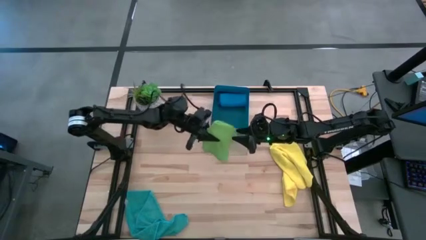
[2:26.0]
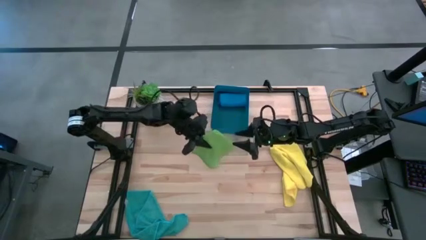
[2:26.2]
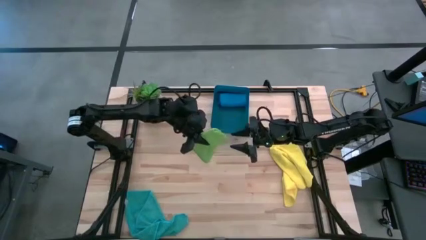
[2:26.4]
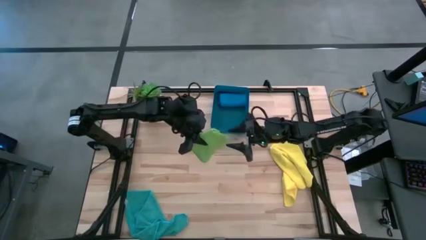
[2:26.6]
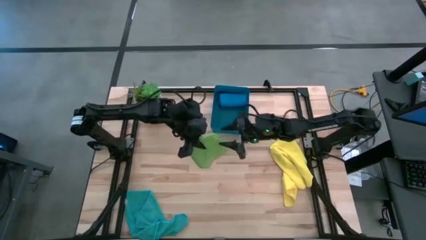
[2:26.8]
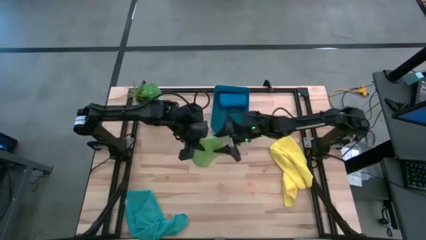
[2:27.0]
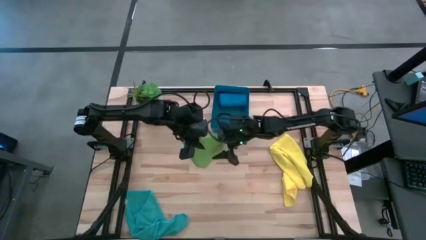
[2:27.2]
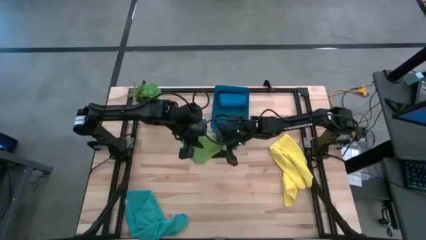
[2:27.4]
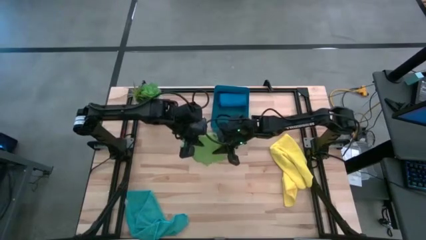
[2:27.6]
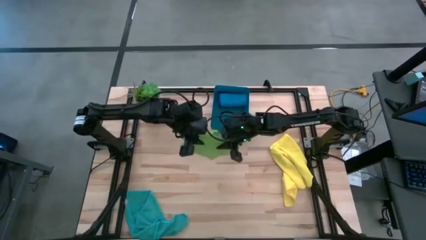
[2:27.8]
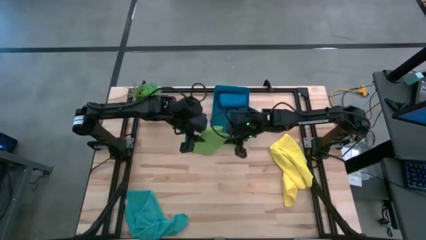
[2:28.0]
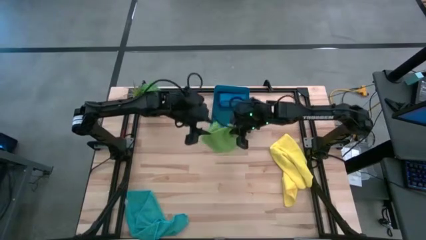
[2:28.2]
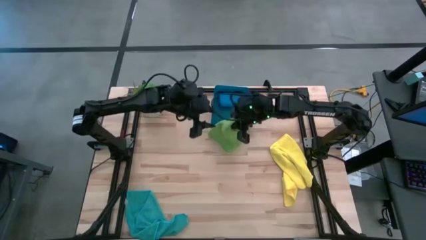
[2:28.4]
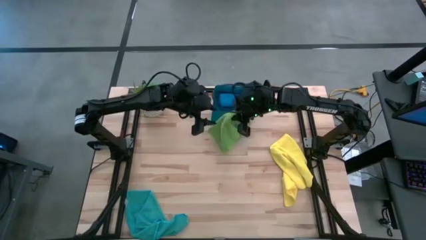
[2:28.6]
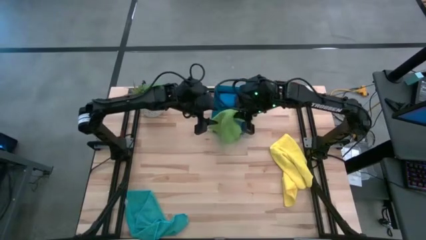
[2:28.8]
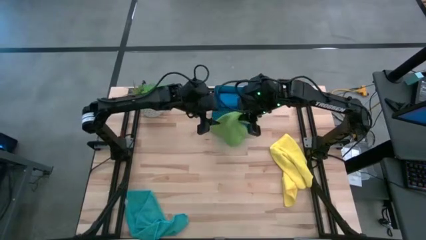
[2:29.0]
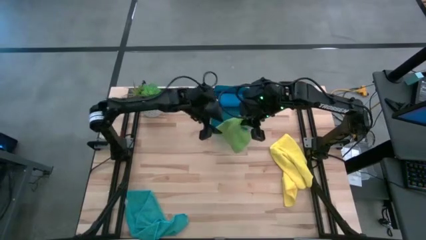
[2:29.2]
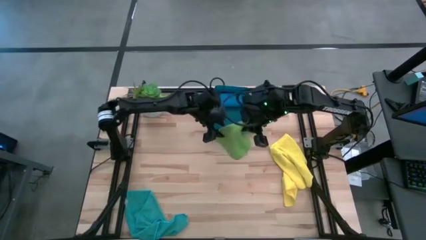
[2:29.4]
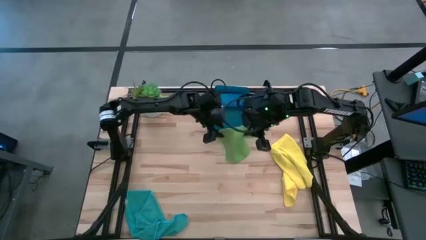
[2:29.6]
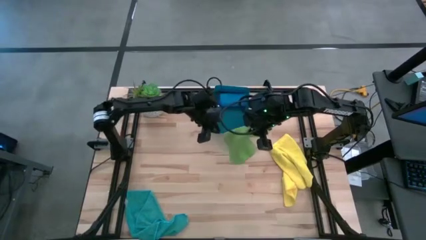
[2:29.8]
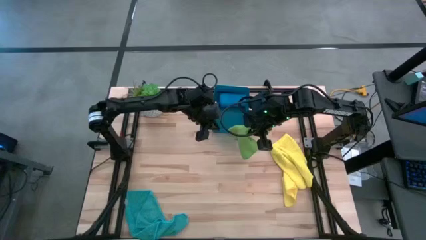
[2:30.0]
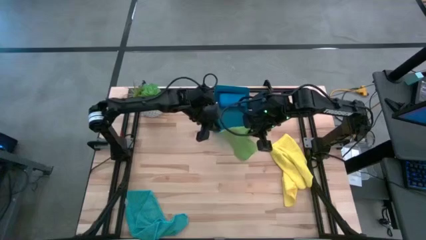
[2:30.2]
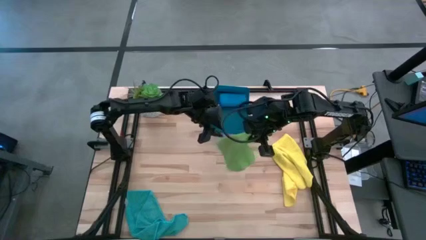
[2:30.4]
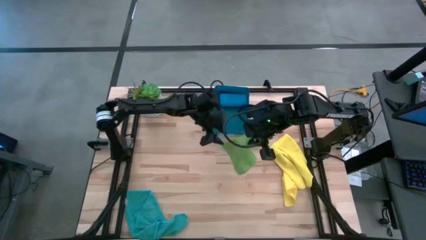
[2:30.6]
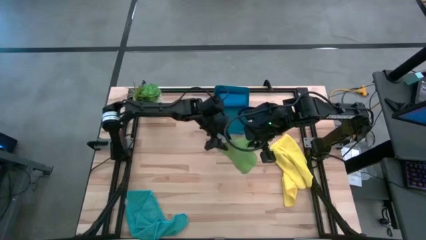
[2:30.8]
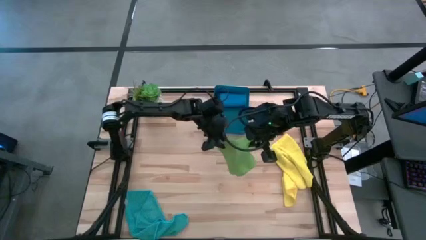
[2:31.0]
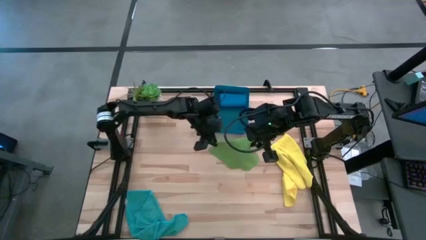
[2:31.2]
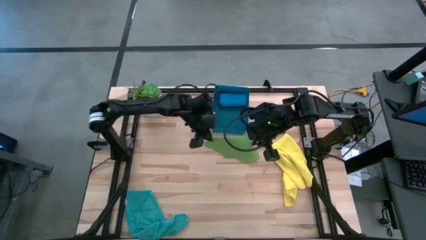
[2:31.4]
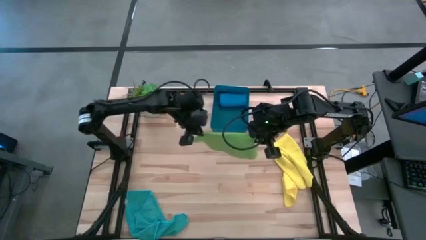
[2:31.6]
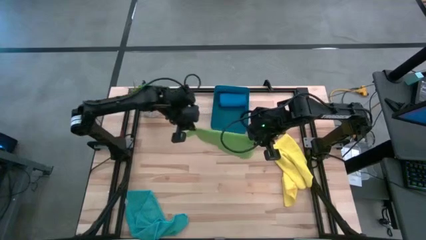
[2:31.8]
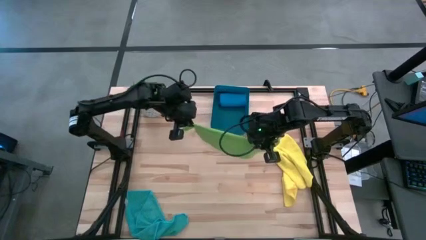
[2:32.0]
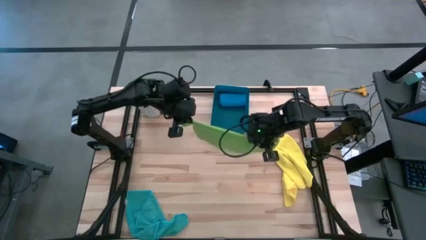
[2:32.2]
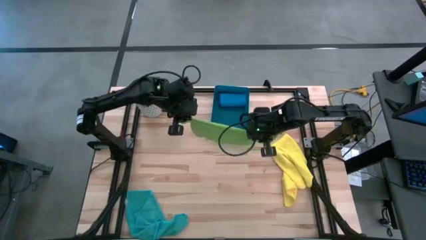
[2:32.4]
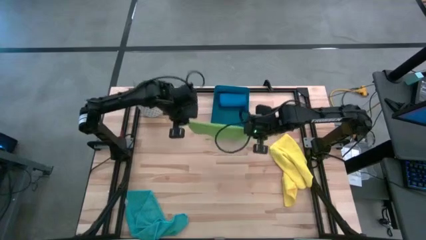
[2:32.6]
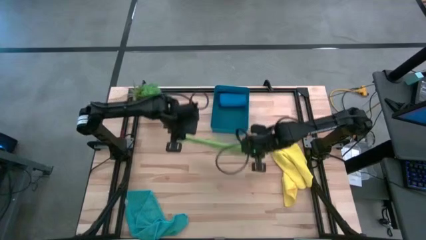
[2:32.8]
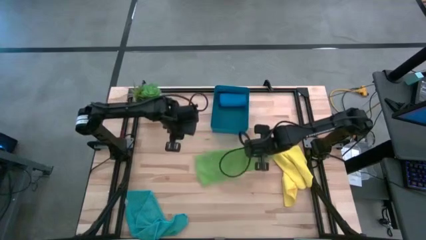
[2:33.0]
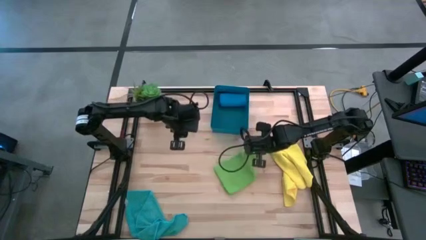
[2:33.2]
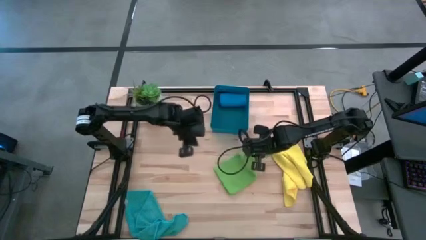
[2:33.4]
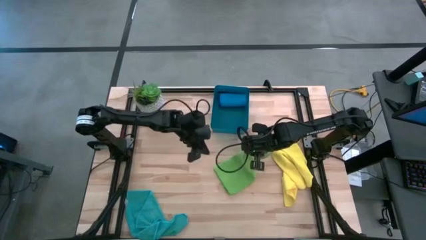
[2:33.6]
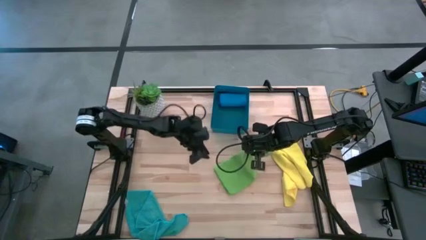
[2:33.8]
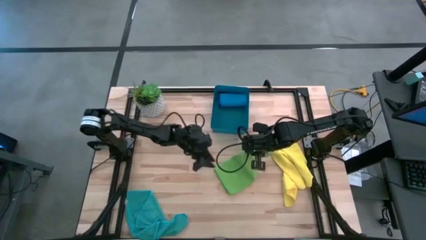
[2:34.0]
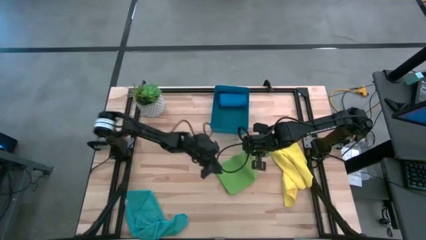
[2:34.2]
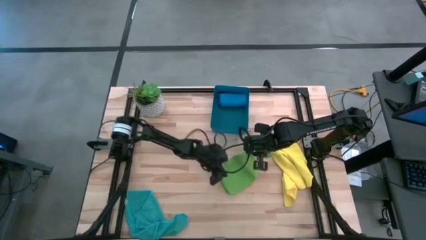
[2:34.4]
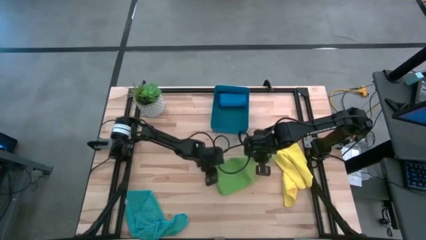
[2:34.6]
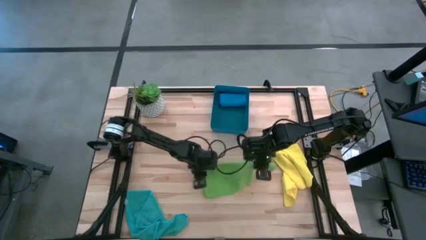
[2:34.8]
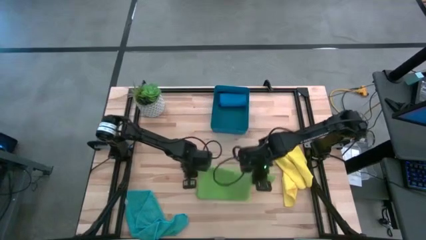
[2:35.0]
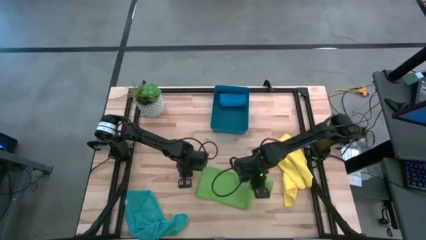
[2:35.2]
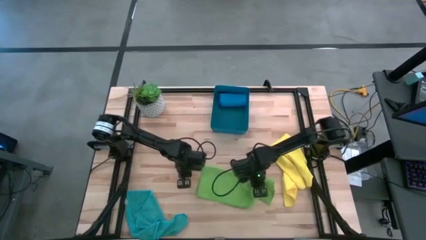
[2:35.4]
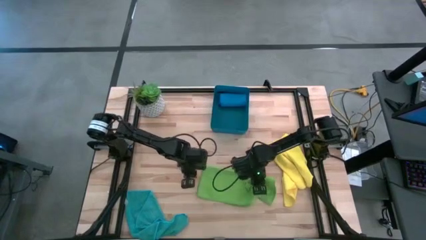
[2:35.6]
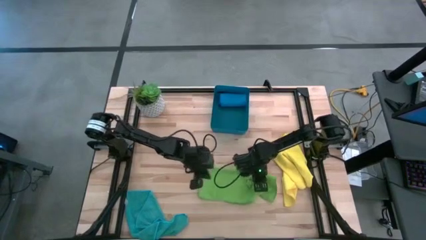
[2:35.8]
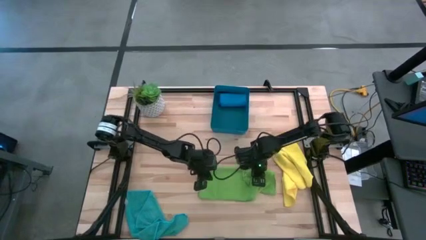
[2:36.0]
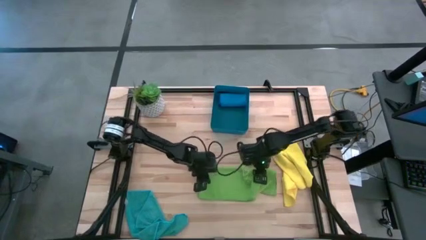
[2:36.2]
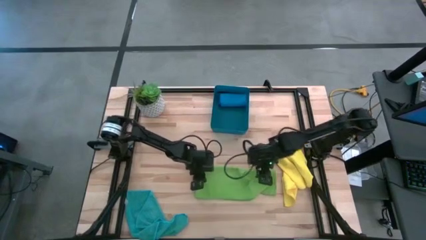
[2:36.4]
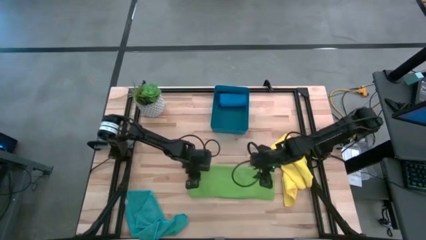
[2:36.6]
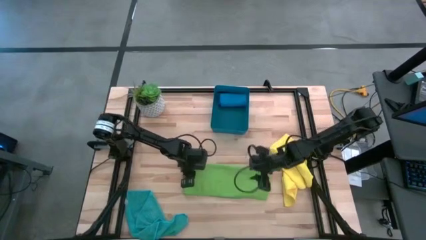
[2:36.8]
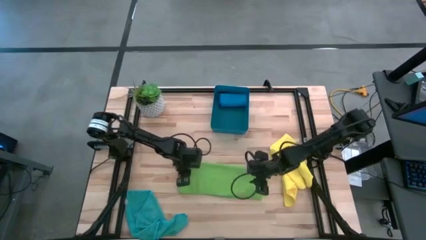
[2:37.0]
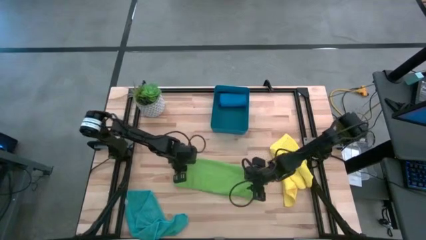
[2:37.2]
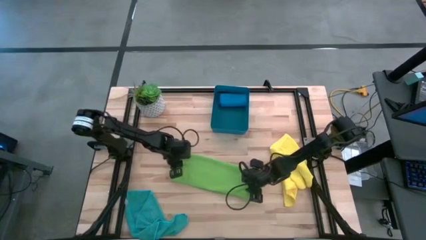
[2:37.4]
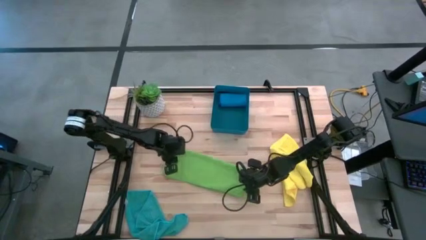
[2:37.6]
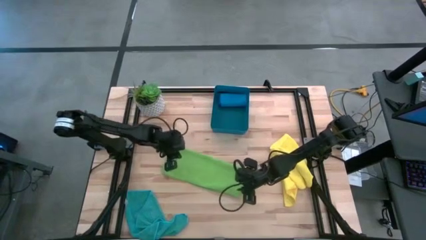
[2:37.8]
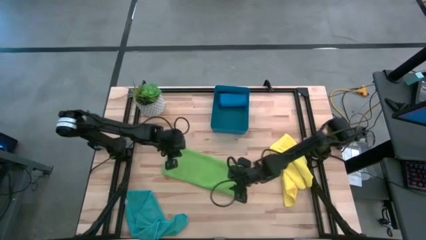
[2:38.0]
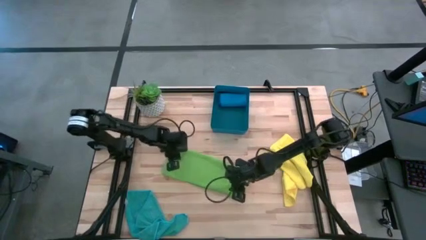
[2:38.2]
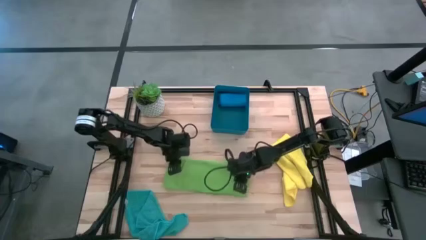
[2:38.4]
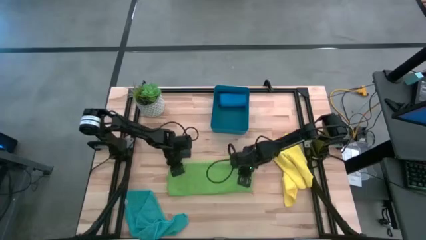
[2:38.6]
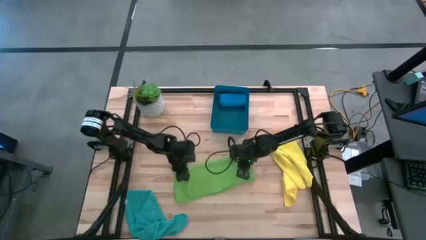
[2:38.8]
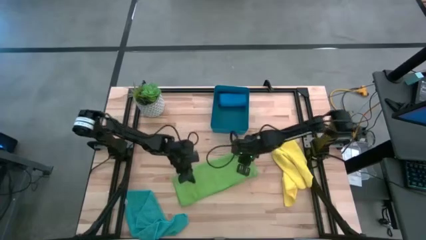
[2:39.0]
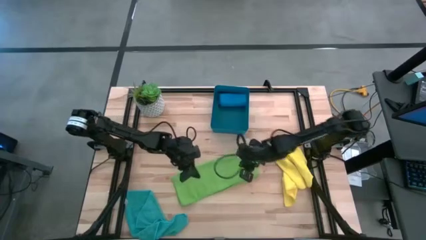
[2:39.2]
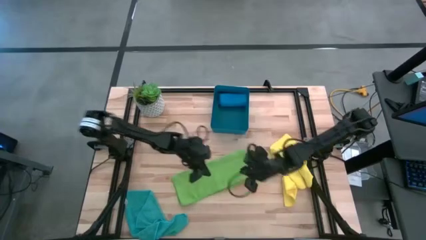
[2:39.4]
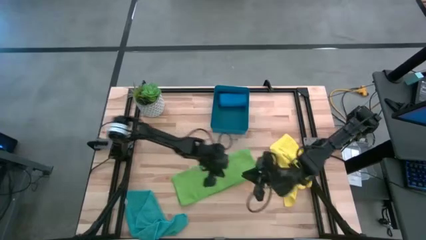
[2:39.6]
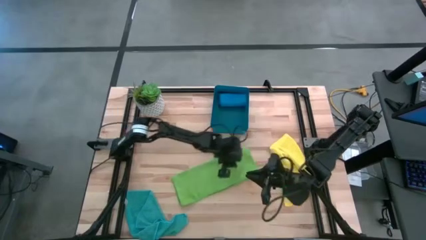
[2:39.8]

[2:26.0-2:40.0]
Task: Fold microfiber towels
Fold the green microfiber cloth

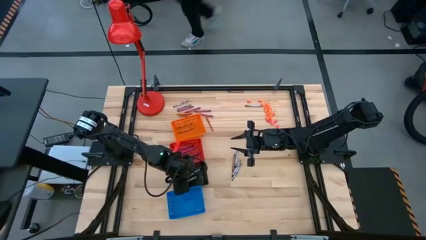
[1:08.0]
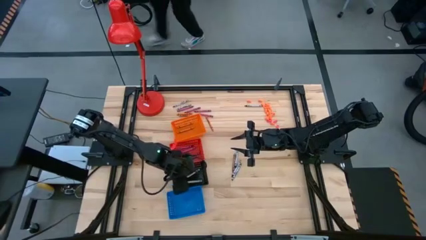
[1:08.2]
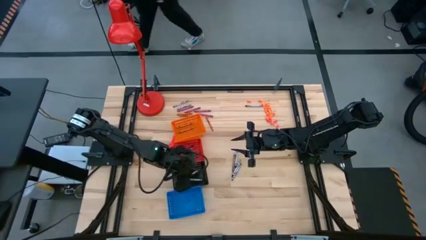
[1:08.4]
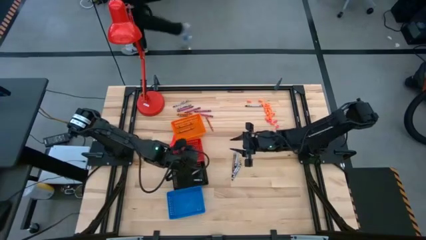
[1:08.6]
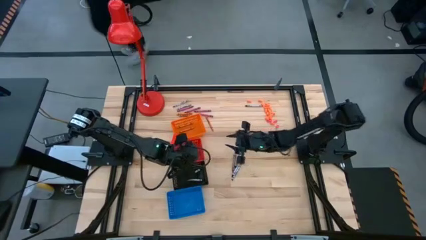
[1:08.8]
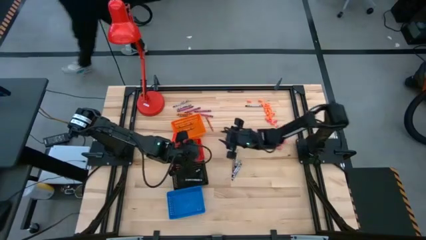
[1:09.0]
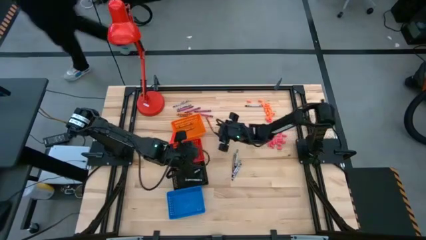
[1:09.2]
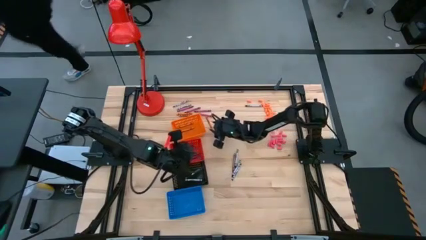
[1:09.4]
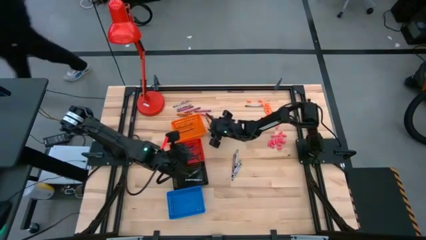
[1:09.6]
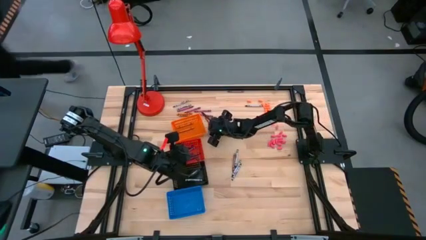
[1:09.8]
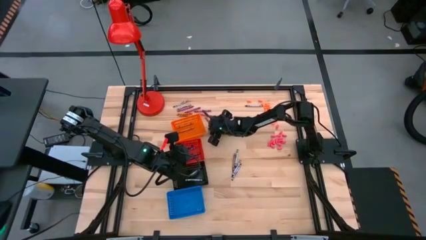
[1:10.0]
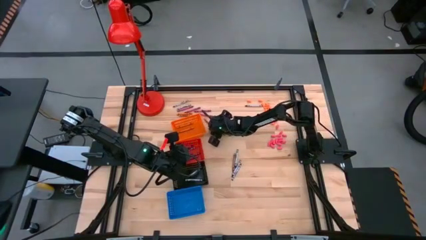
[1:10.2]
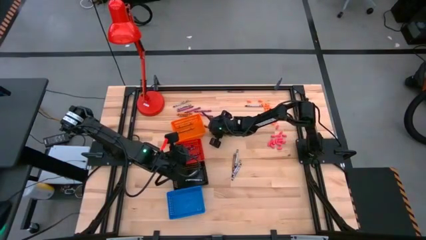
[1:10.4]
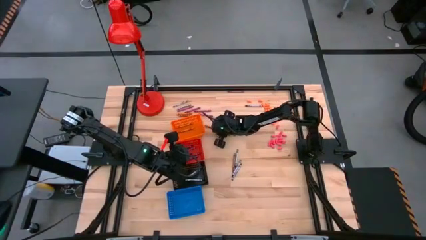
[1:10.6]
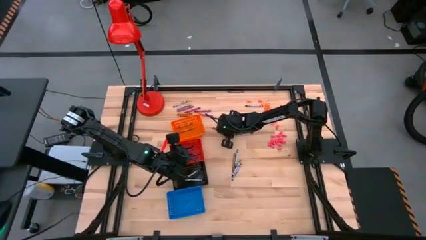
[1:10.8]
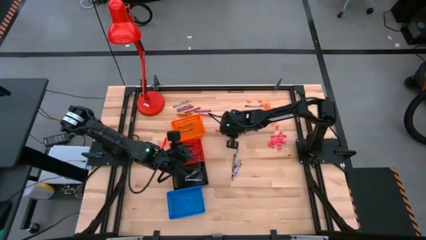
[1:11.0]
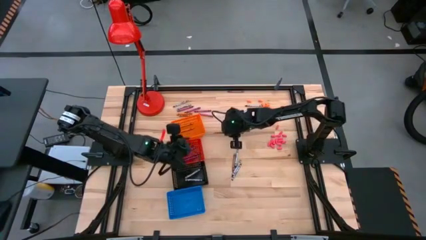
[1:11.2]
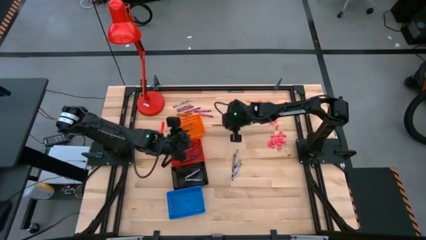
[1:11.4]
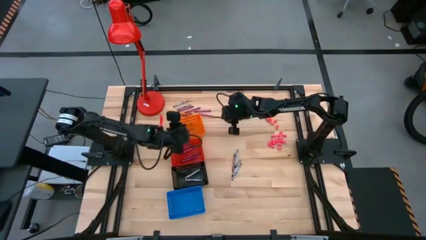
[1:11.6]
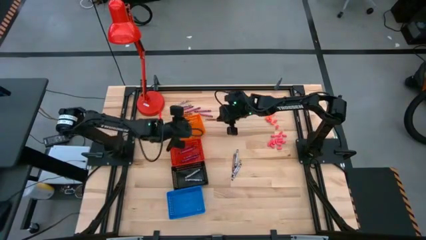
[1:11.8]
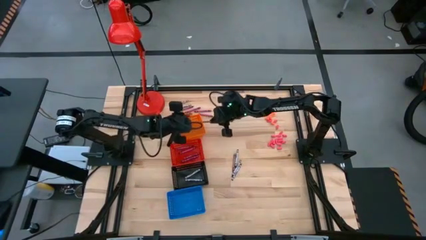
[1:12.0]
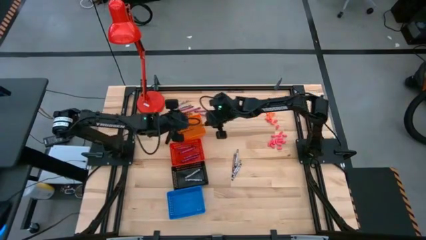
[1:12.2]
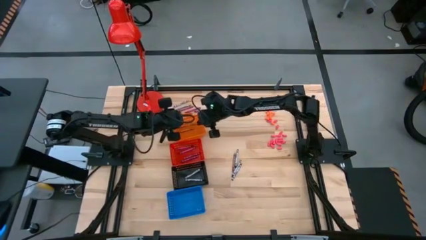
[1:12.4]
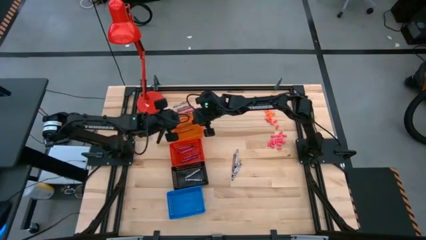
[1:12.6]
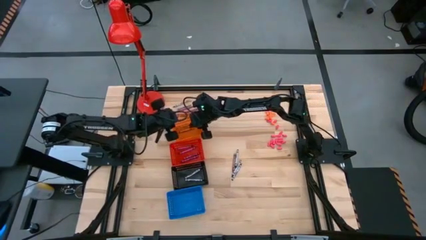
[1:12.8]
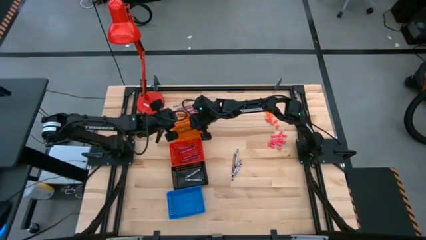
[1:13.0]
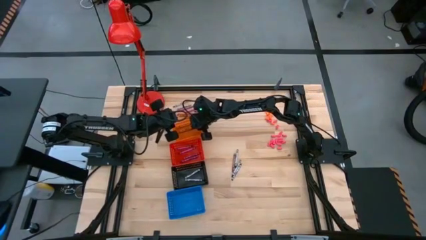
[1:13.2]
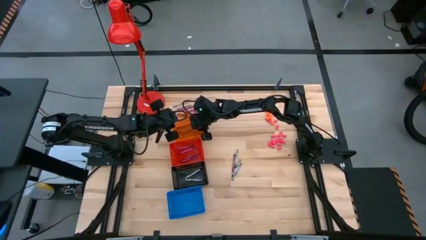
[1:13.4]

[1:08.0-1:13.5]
Task: Sort crayons
Put the orange crayon into the orange basket
